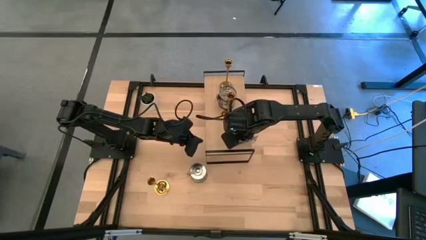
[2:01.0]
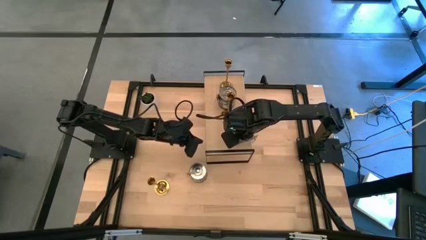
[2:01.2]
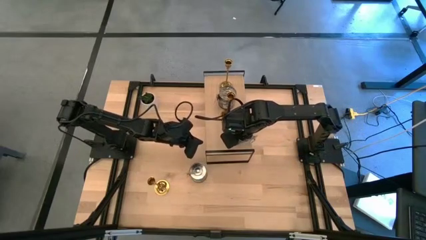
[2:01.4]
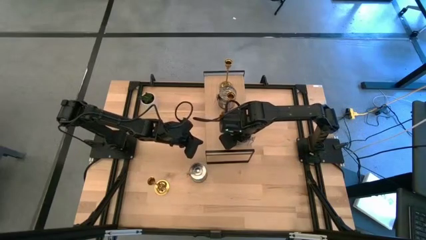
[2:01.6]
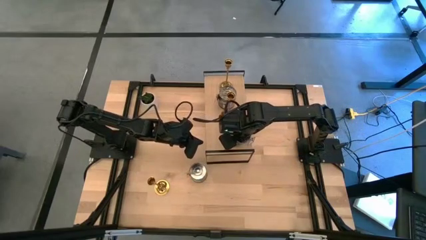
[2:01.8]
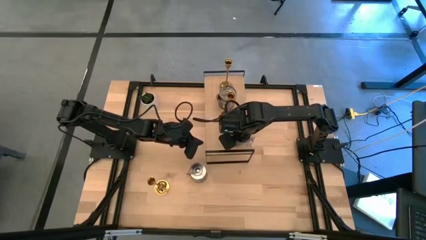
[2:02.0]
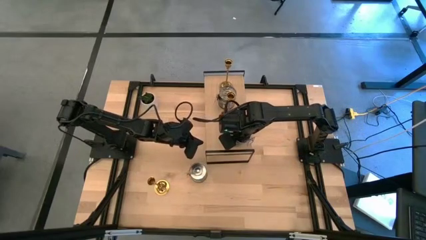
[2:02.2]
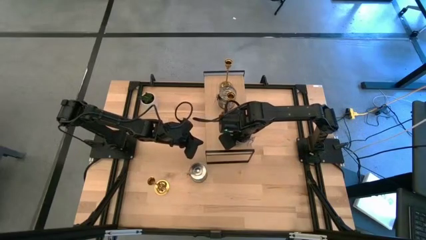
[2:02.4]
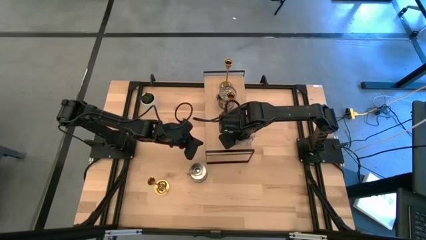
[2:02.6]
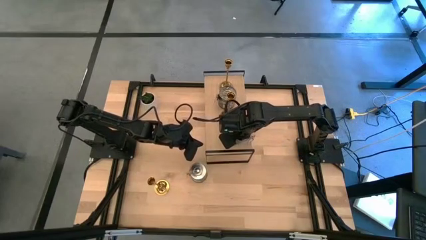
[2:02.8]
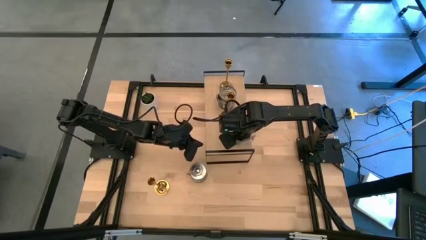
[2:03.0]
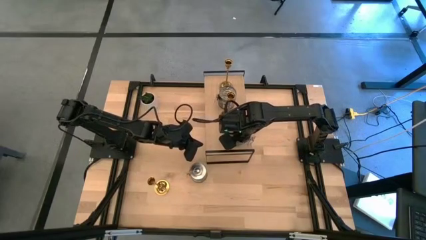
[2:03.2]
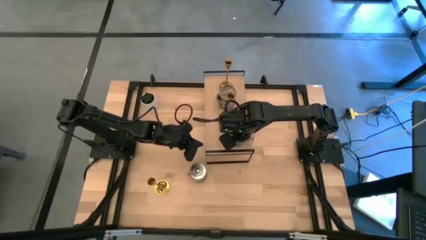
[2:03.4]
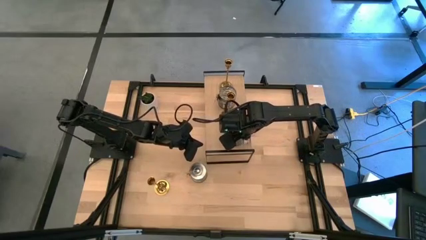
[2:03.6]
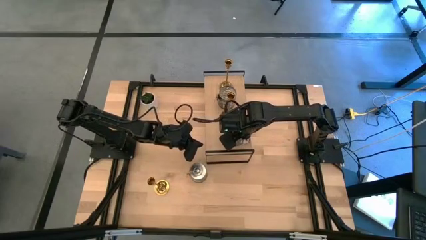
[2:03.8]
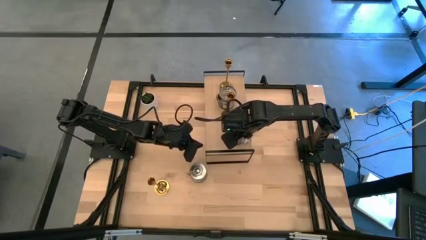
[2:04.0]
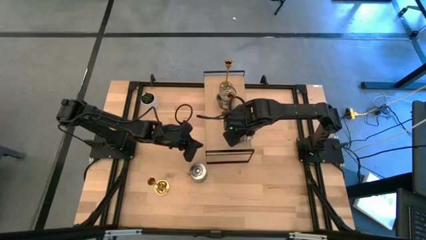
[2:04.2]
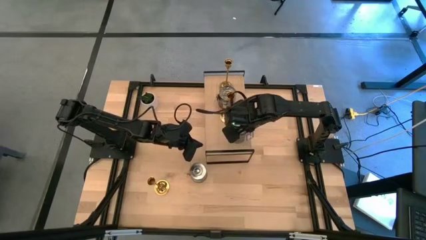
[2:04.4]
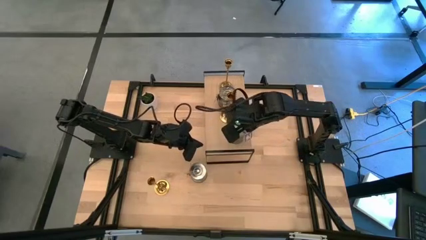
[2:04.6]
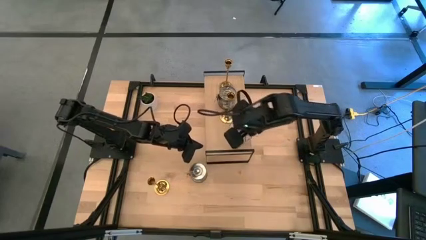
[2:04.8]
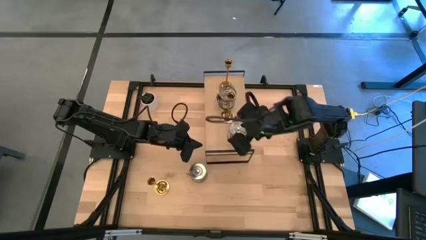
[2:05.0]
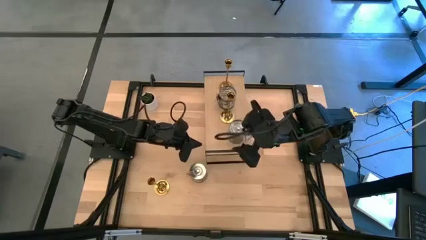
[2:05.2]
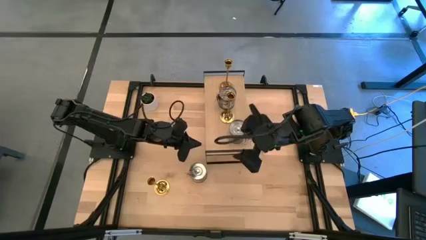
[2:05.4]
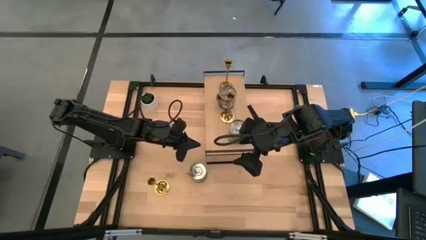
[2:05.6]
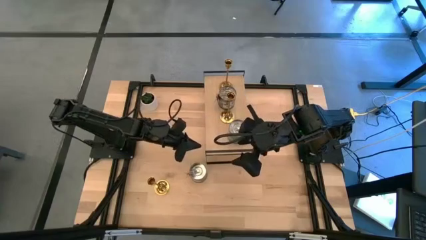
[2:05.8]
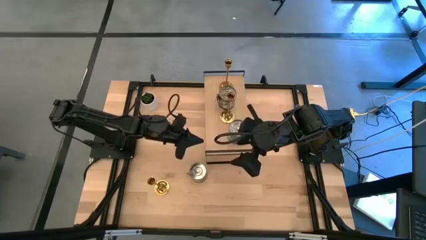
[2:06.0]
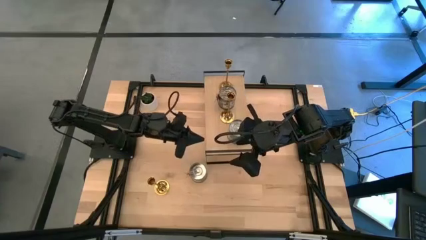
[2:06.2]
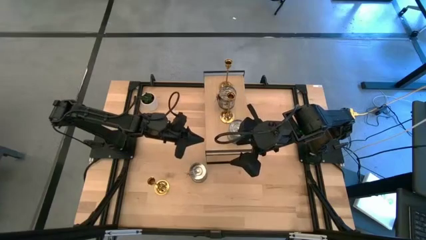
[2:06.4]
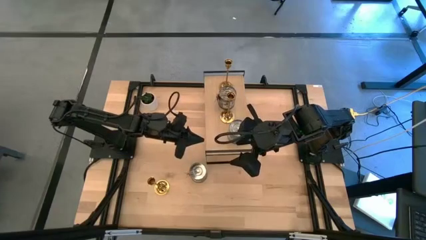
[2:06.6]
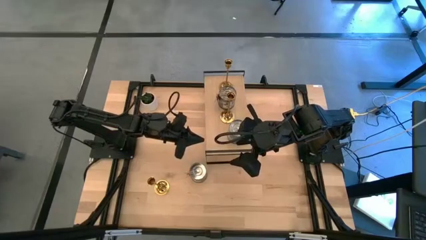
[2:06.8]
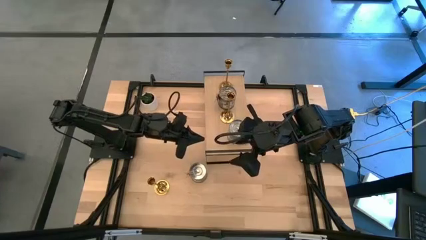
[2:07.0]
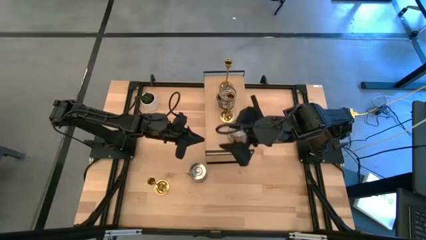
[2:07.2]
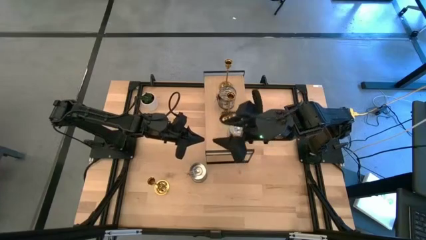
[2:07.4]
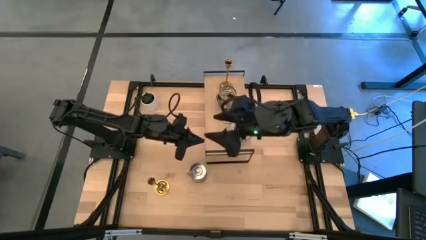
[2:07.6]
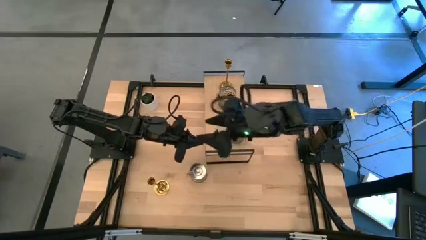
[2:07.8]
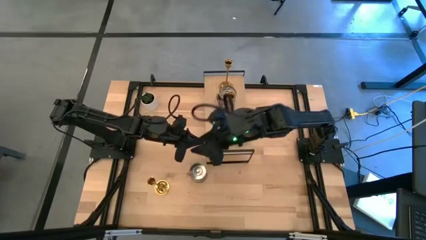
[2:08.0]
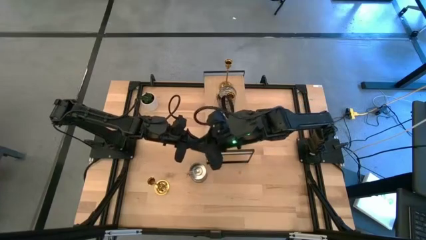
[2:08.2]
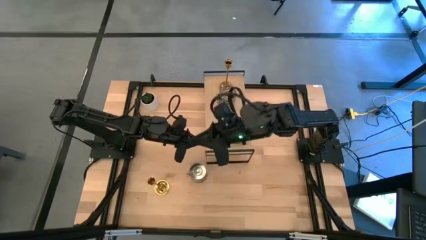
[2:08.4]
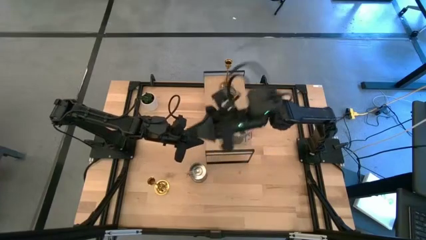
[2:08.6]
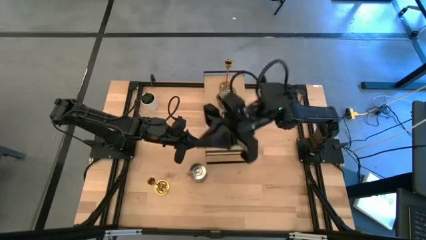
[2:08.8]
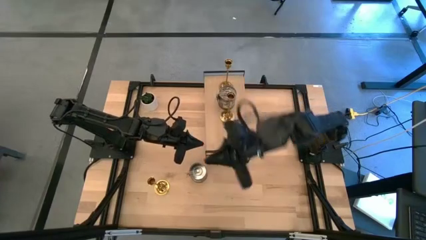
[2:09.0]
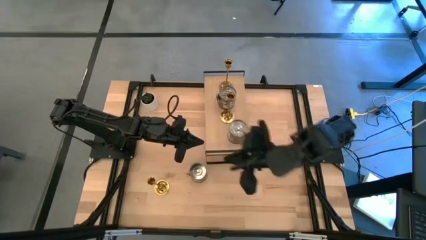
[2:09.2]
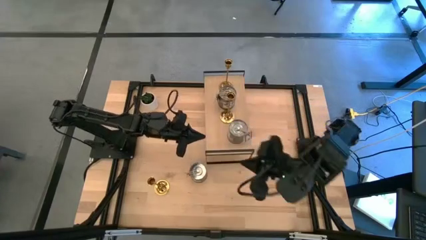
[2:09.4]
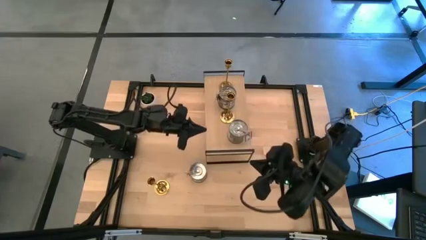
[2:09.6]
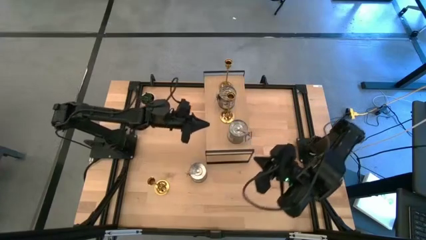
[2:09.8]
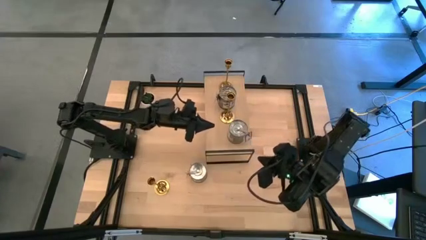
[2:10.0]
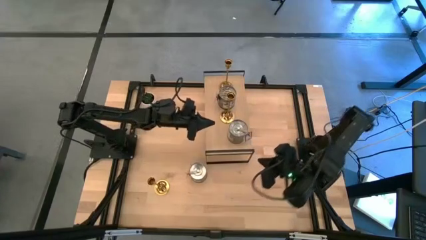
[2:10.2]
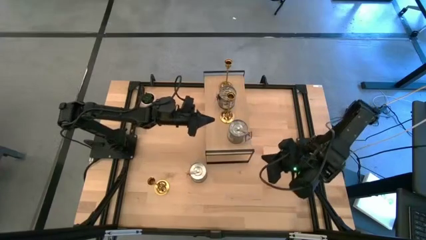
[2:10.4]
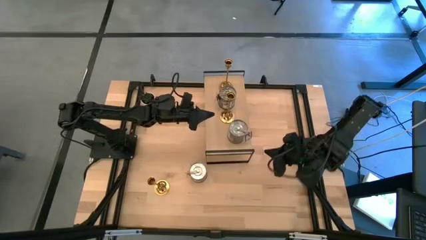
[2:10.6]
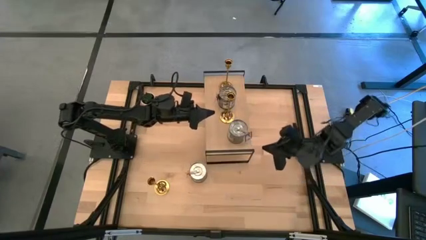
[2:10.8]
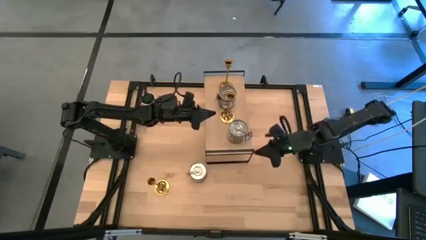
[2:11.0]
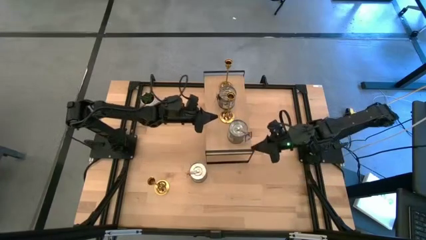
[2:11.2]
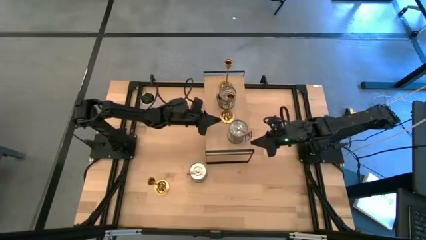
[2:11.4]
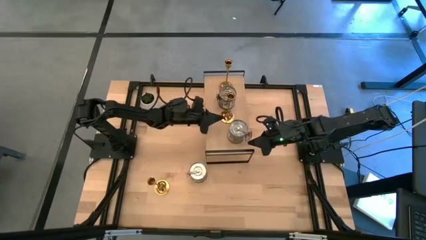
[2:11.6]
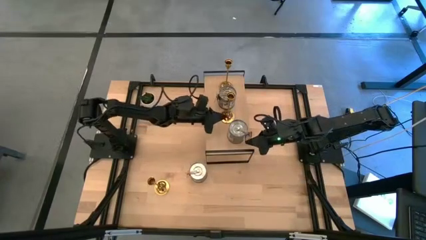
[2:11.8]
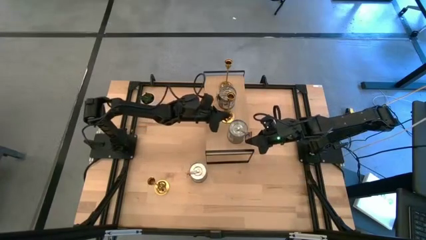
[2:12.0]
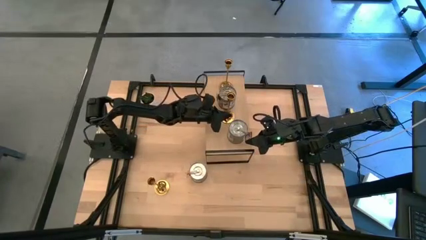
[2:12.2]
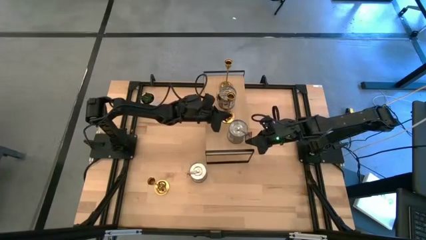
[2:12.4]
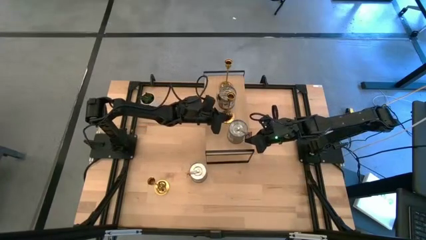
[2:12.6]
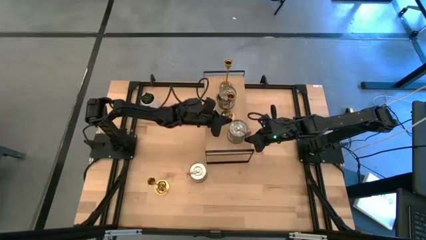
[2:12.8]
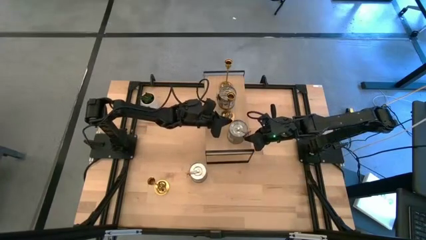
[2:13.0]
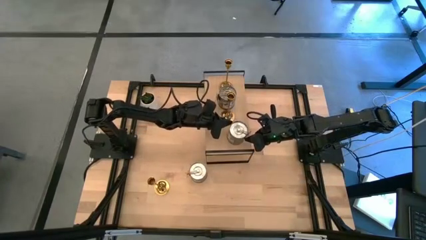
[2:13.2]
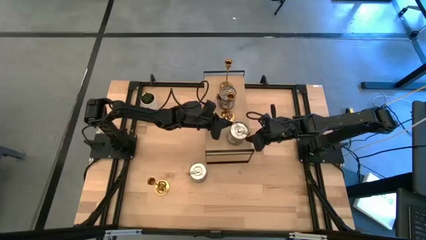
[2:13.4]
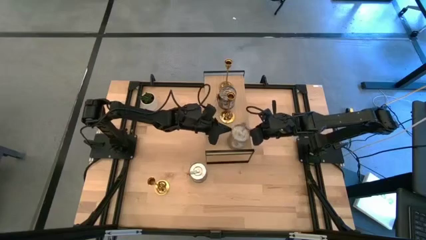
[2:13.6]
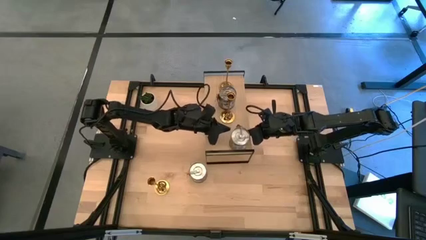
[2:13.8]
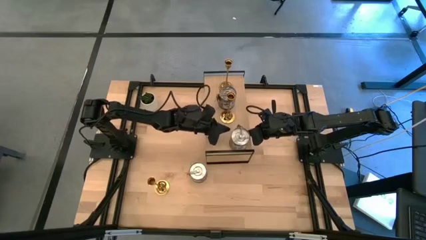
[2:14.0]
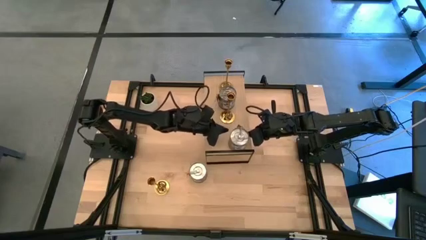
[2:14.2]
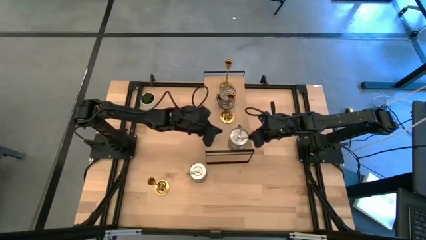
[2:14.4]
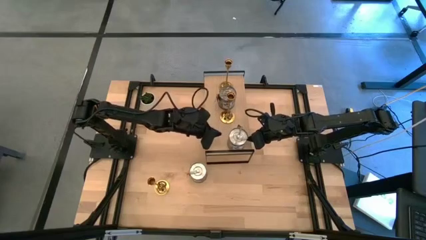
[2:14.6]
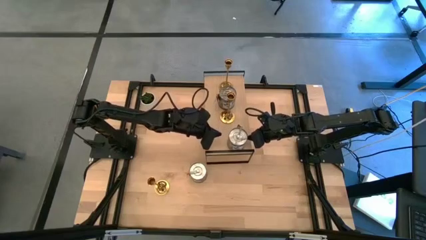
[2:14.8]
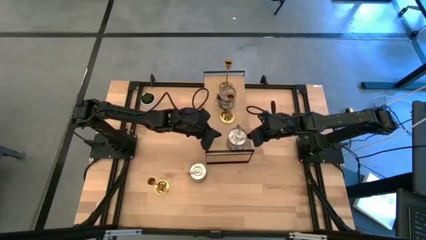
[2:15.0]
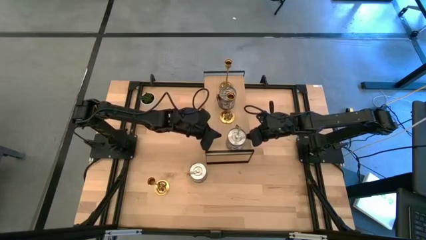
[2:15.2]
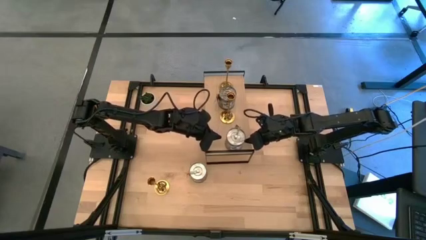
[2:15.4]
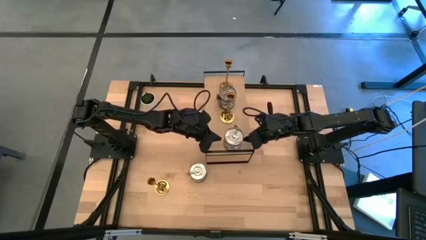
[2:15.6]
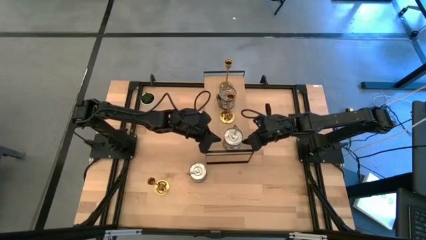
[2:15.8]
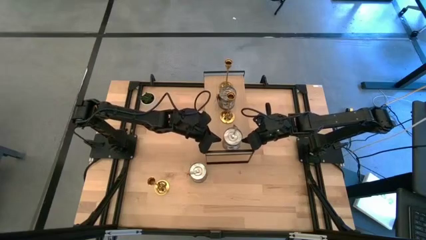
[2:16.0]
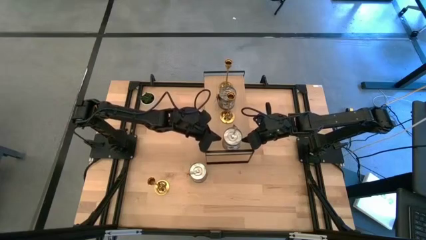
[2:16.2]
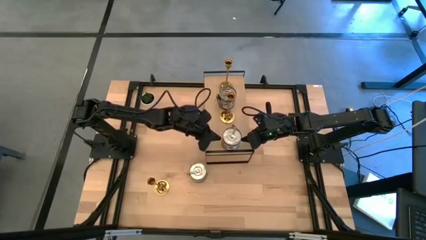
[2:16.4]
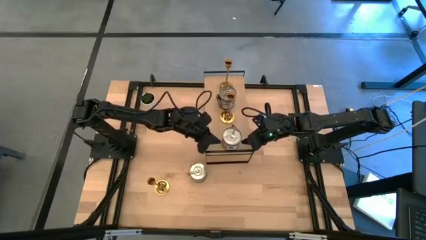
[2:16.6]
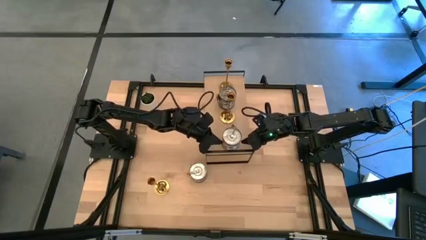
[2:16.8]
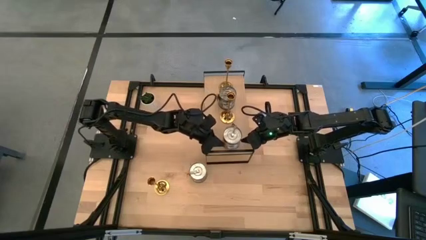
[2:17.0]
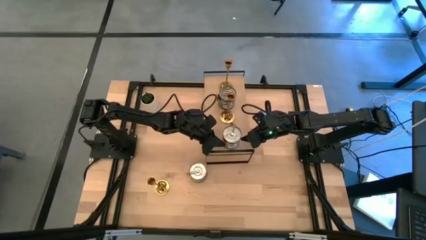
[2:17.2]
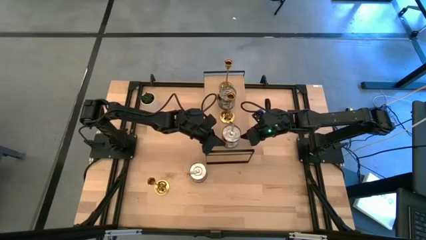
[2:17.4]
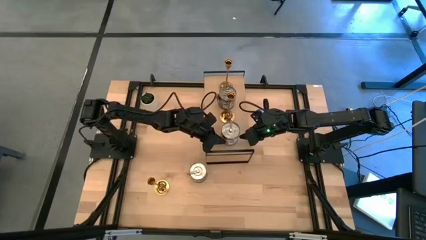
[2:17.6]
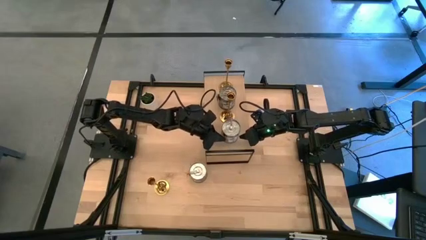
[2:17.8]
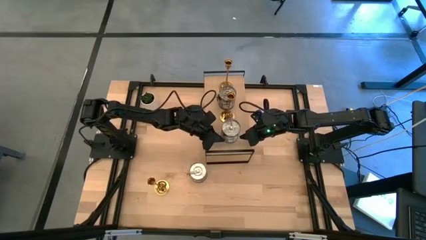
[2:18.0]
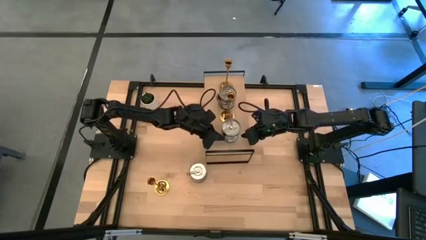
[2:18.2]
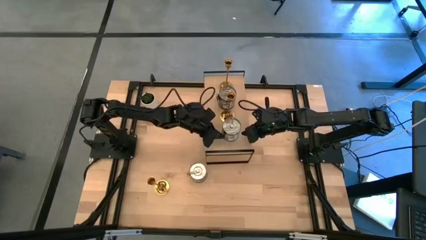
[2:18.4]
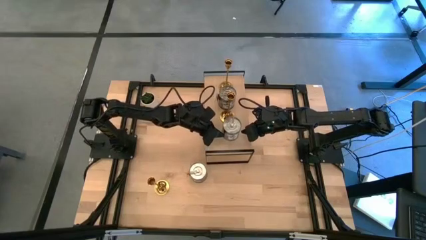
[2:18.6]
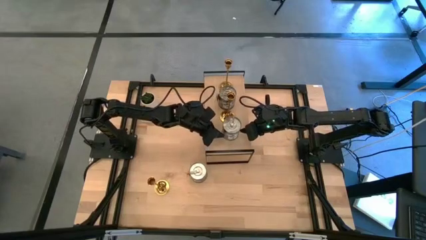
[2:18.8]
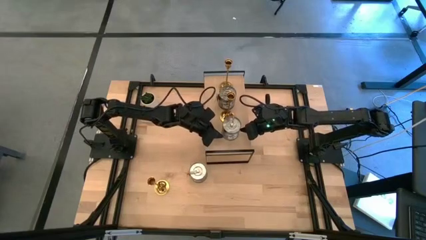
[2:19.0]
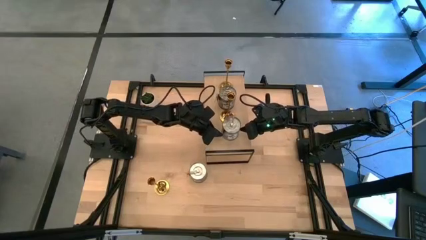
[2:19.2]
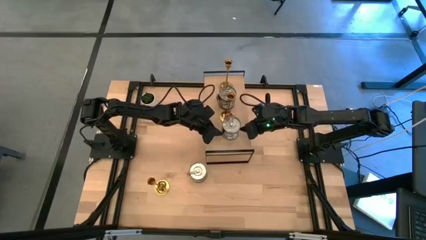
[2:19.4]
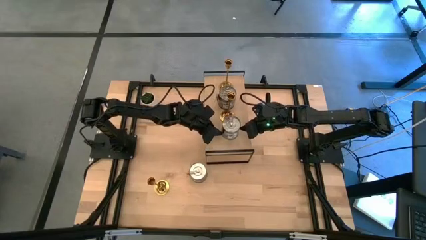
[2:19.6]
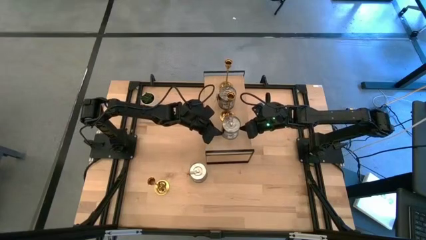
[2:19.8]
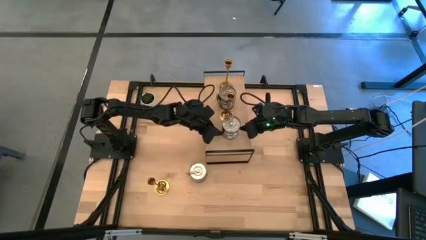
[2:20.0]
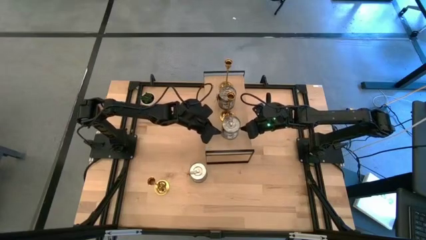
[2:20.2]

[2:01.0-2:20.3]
Task: Pick & Place candle stick holders
Put the right silver scented candle on the shelf
